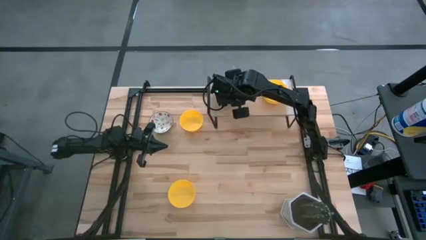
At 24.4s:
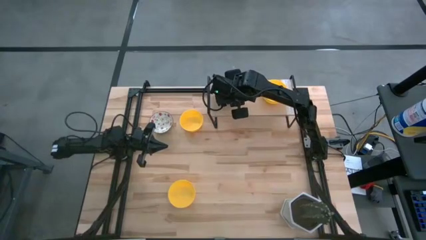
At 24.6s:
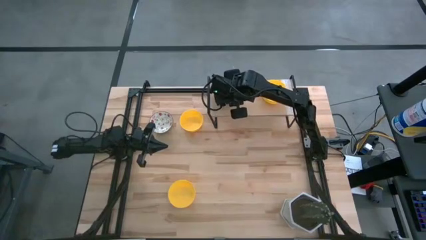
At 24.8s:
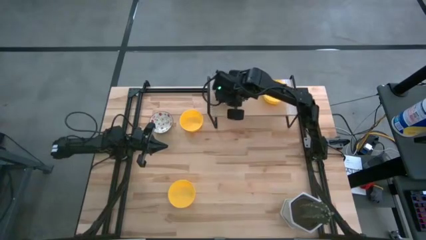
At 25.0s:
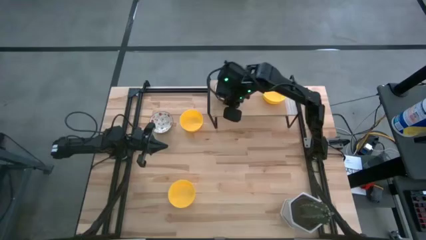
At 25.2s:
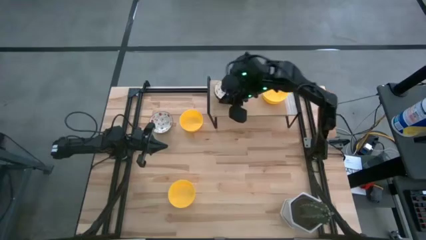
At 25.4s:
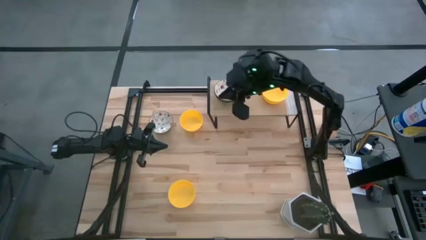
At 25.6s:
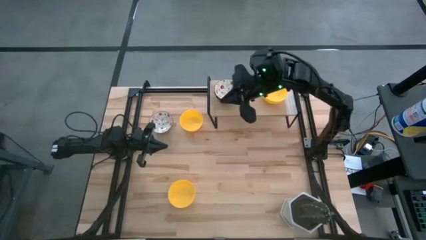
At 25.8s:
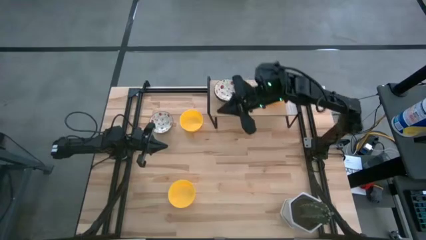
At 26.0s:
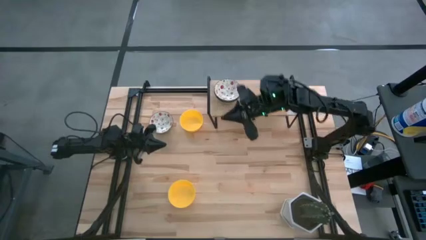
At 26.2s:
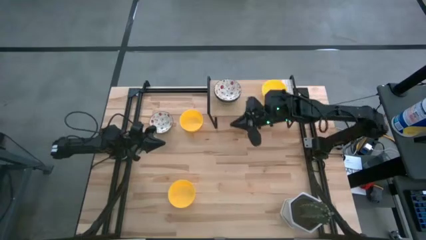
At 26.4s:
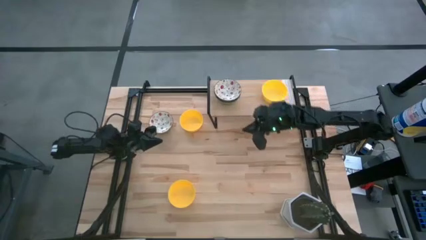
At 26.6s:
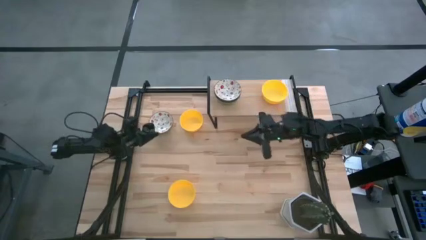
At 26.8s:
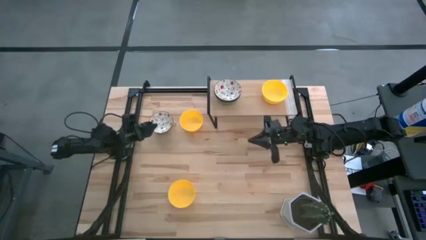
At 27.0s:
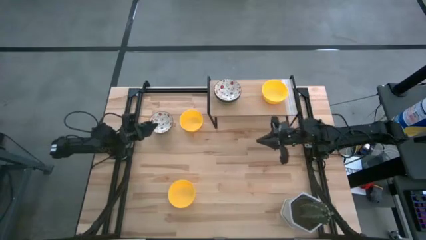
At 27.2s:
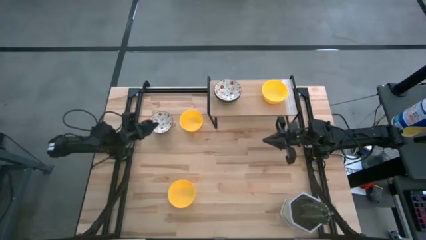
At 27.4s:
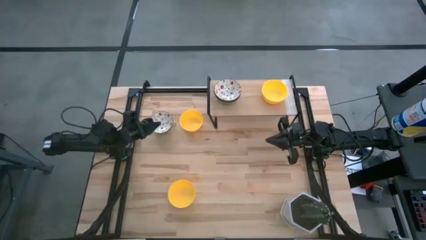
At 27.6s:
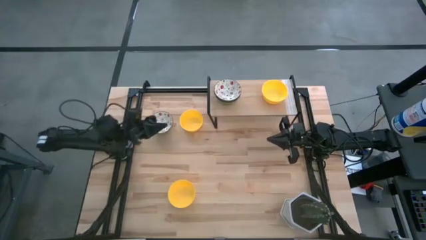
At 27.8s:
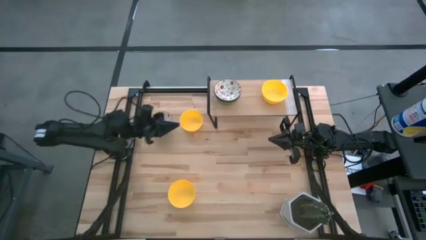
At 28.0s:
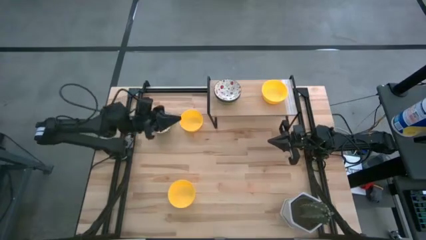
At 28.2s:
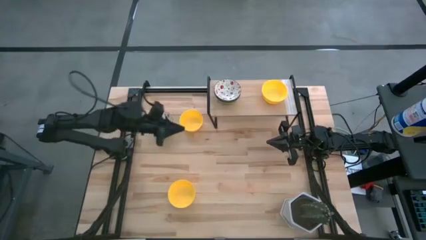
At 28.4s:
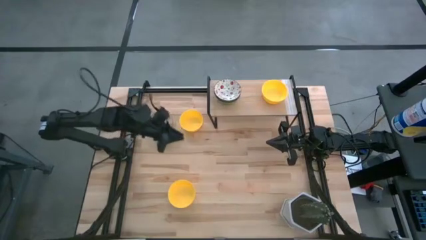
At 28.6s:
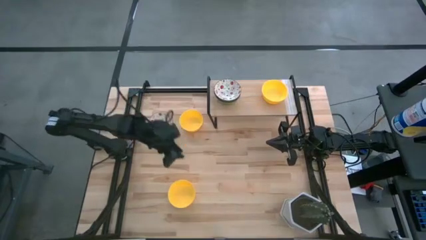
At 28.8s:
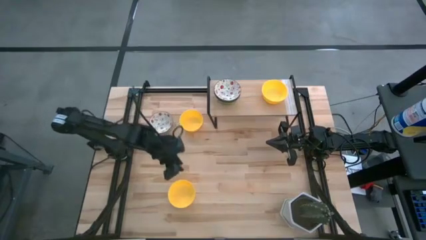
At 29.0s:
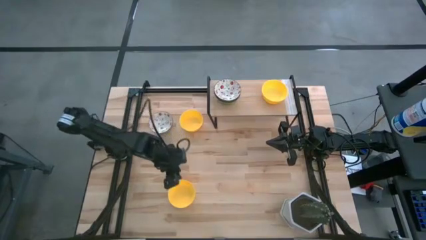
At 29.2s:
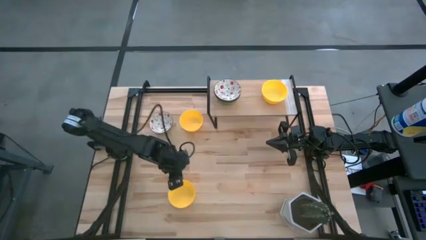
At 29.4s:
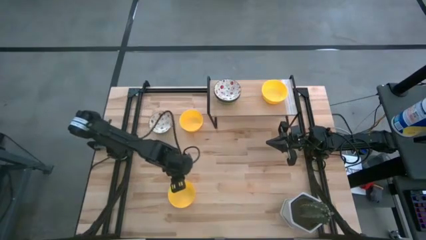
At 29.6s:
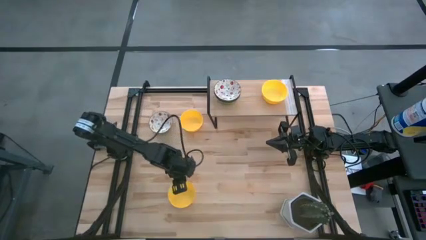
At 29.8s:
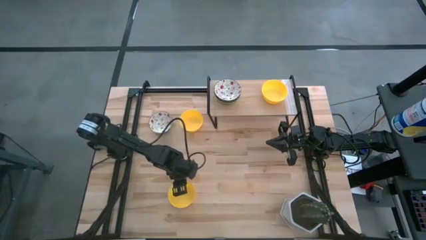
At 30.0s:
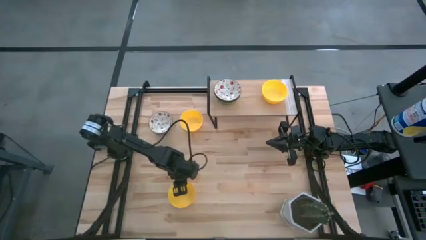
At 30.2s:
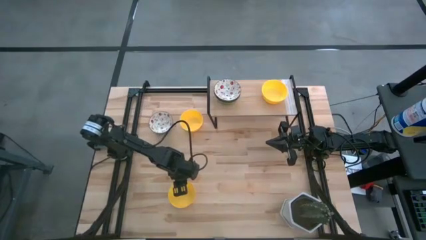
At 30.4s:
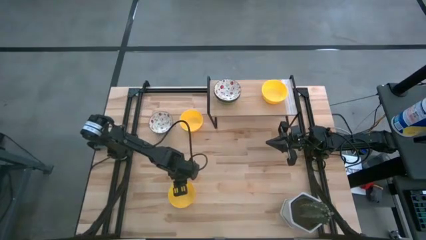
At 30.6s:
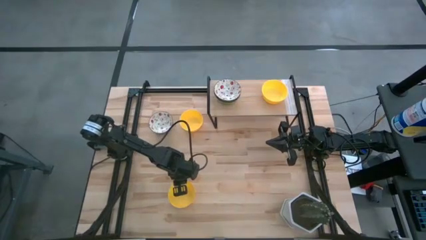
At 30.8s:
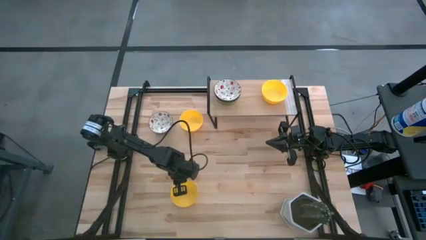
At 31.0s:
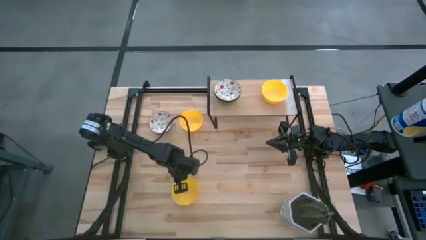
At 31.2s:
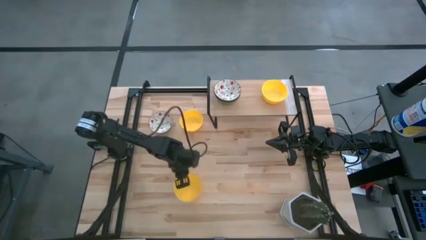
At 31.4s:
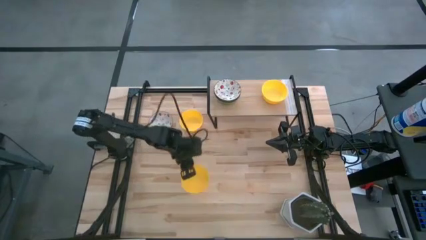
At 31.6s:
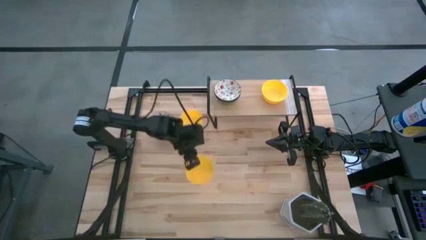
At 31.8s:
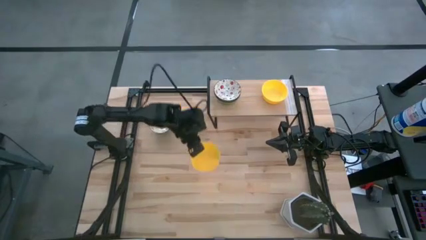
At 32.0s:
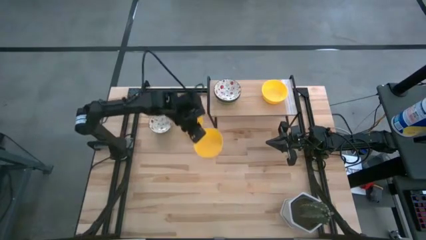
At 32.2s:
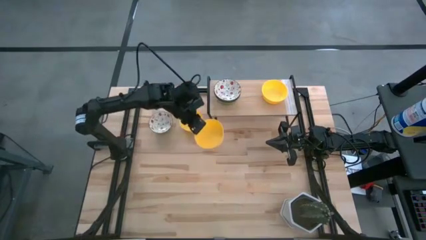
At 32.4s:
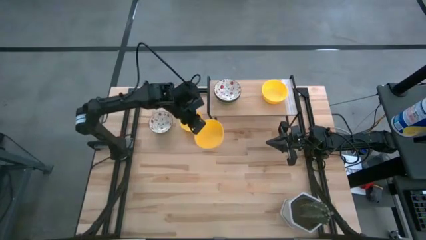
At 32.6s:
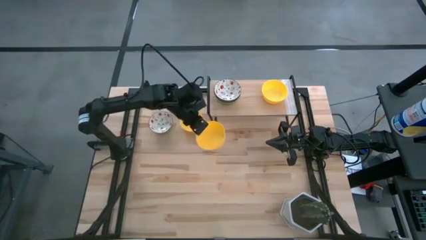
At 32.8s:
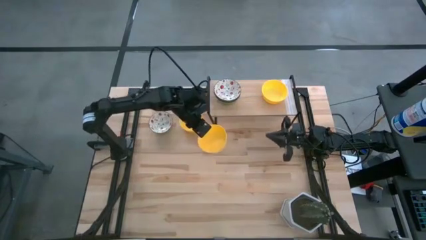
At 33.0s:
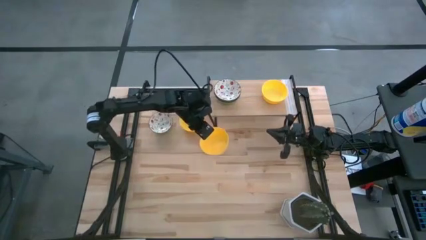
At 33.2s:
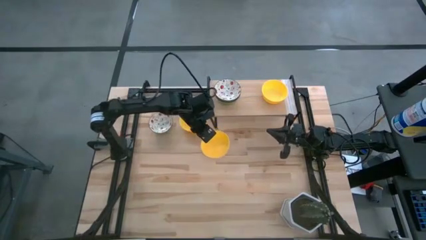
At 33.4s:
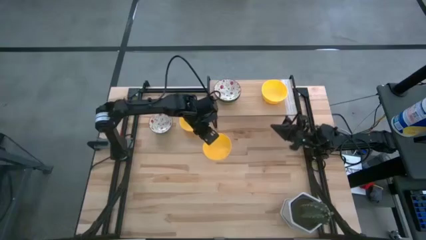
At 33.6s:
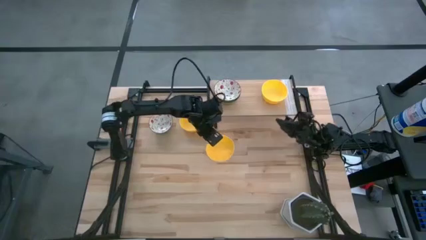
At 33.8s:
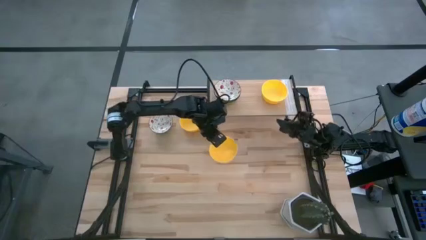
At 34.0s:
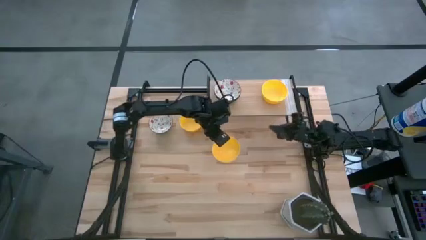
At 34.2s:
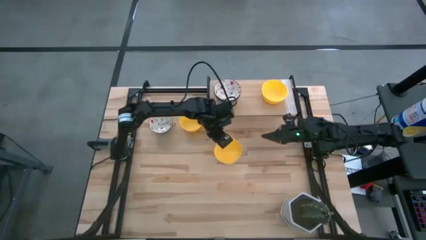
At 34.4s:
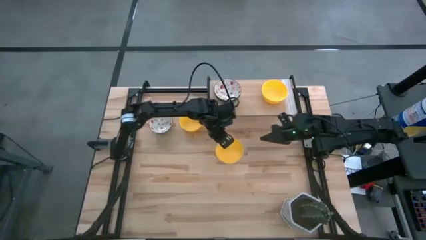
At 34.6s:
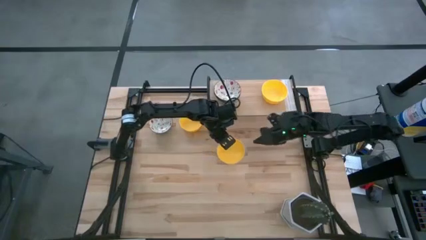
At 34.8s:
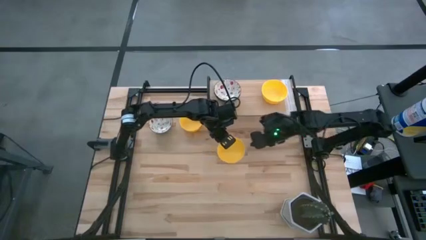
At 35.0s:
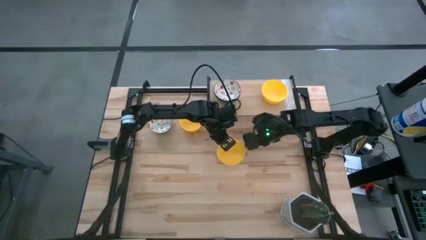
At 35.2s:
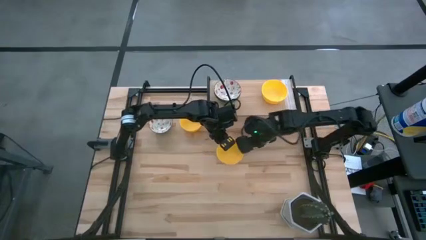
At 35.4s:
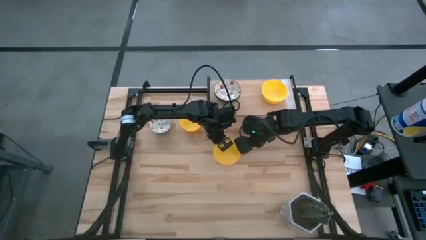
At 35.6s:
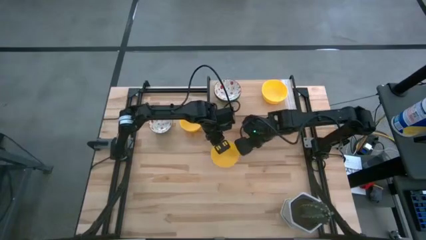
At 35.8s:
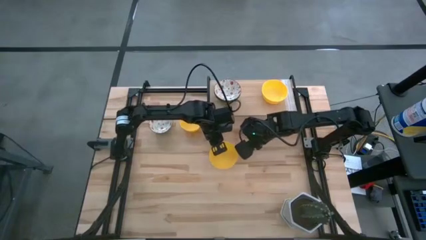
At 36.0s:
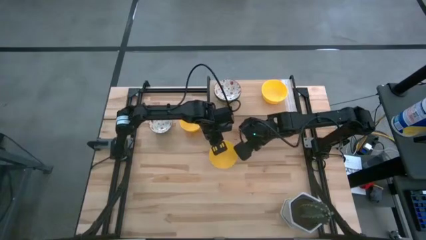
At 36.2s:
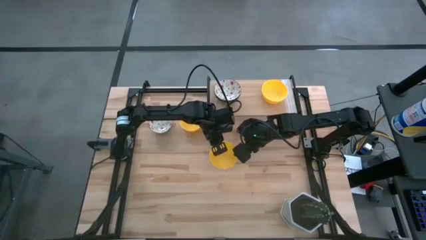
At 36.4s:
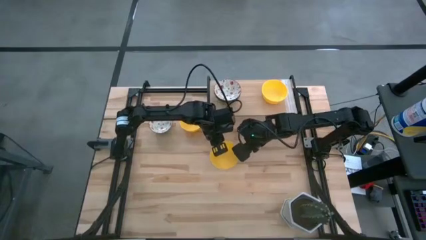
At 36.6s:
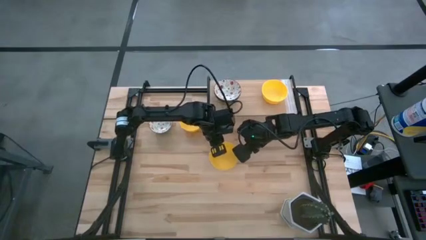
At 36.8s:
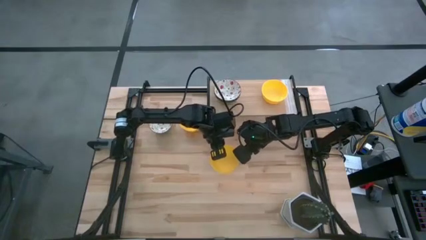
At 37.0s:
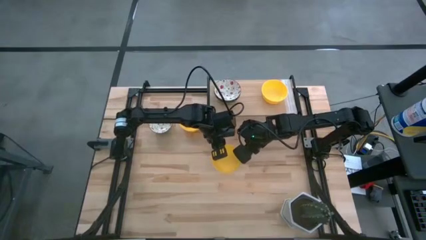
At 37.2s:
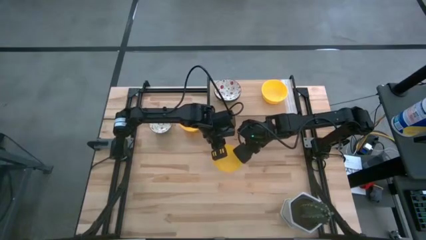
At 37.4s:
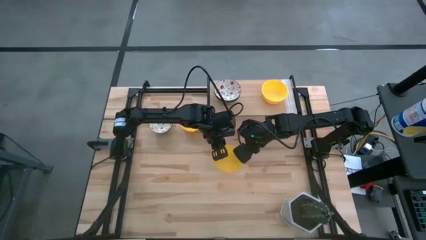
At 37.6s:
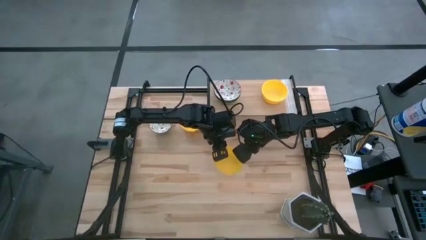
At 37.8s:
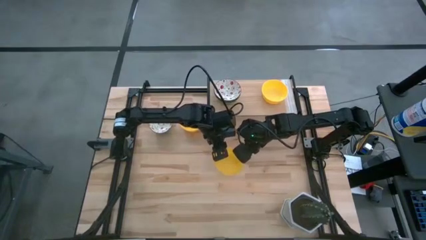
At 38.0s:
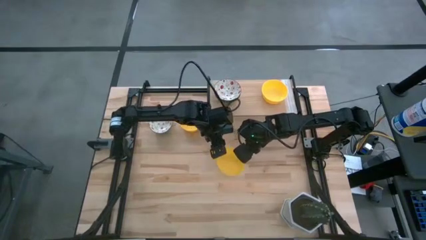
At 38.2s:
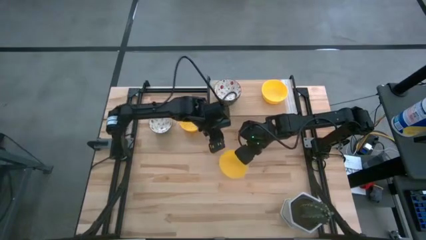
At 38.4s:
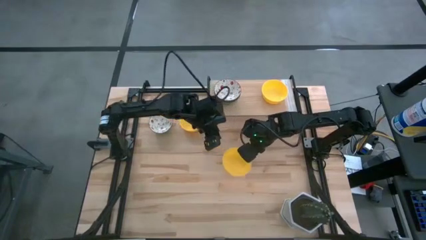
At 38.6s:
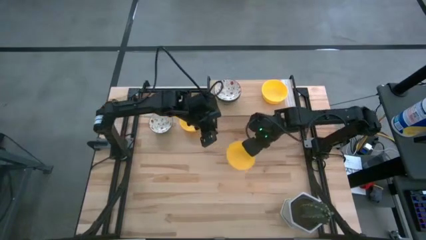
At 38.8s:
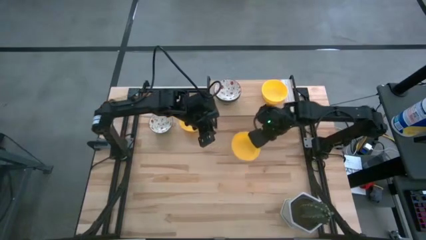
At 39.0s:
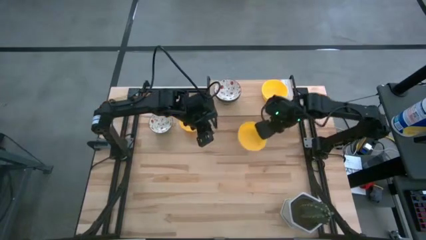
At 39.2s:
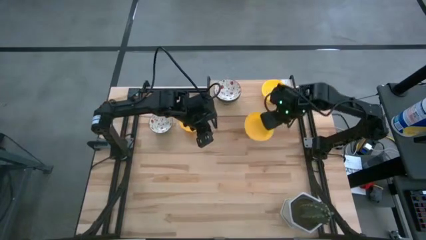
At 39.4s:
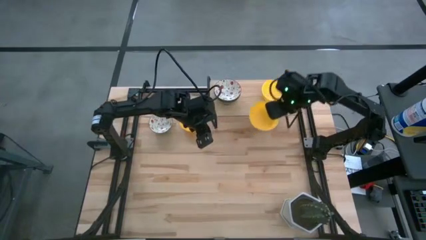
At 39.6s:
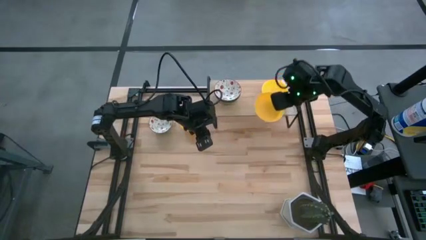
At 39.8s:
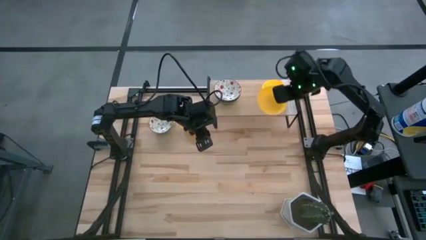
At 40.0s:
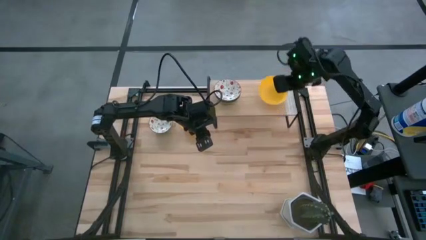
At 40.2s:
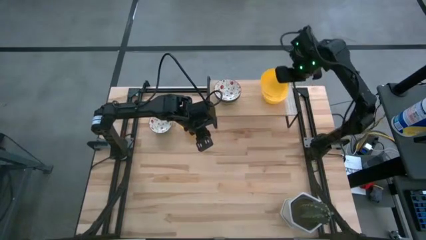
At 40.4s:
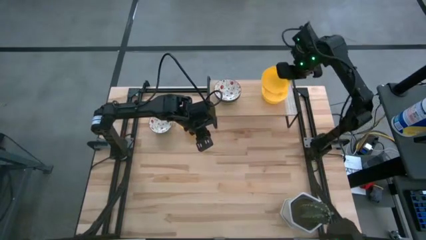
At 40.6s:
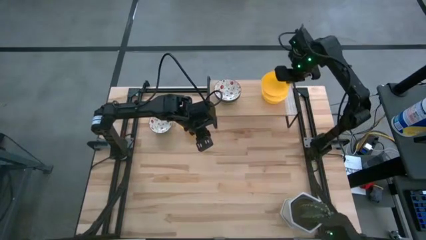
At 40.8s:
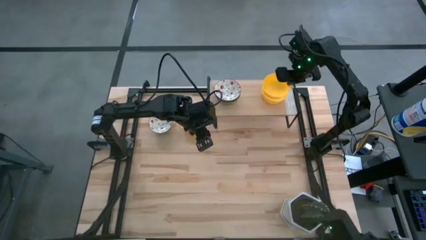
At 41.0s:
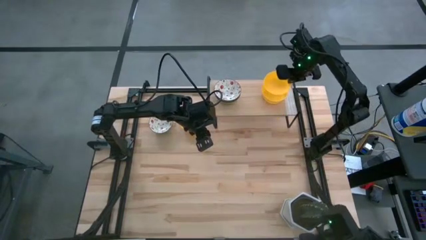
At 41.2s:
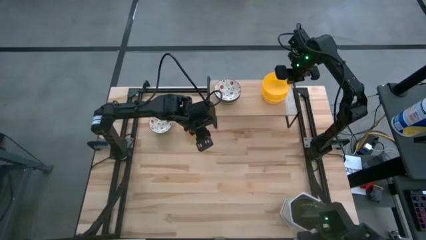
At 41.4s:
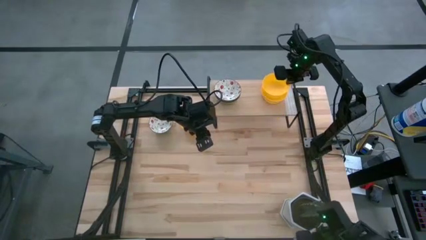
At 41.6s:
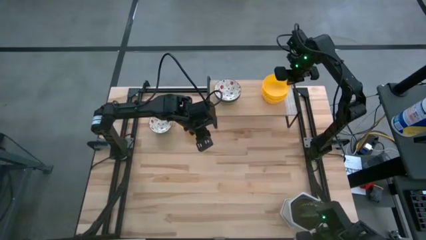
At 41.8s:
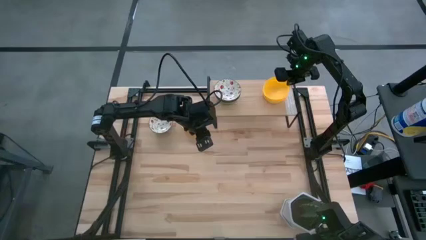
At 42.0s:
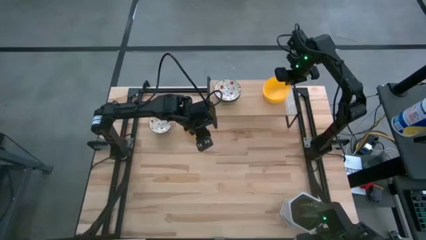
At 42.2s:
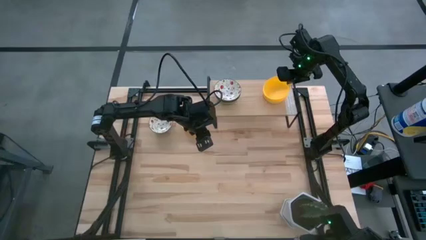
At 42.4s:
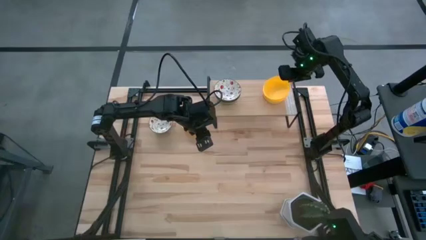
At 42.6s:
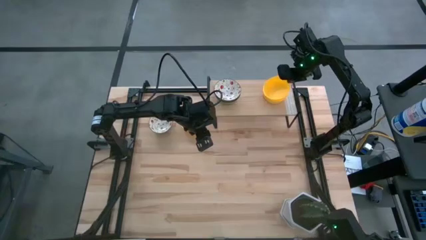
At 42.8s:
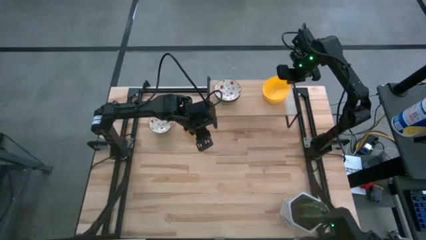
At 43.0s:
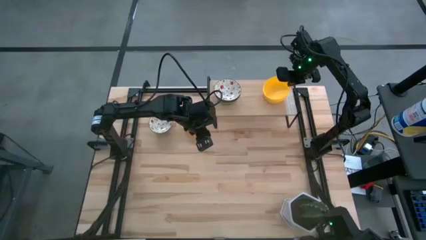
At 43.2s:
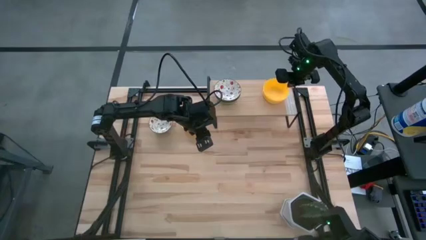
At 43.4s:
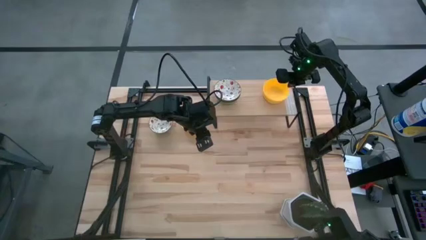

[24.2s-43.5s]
Task: Pick & Place Mini bowls
Stack the bottom yellow bowl on the yellow bowl on the shelf
